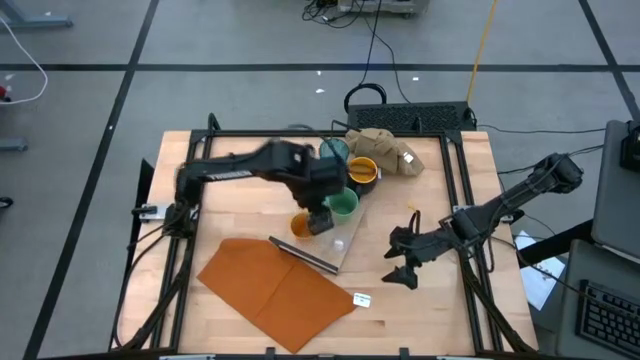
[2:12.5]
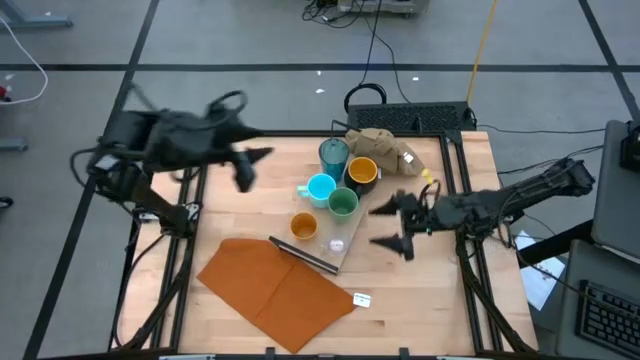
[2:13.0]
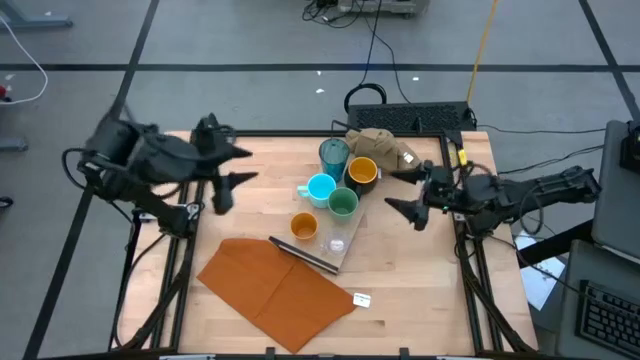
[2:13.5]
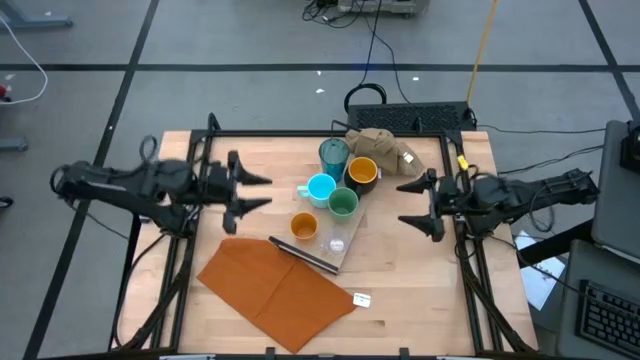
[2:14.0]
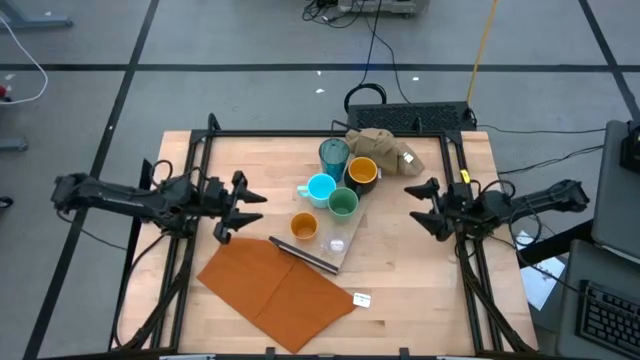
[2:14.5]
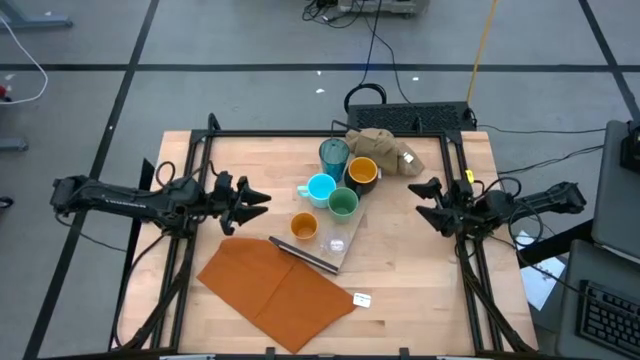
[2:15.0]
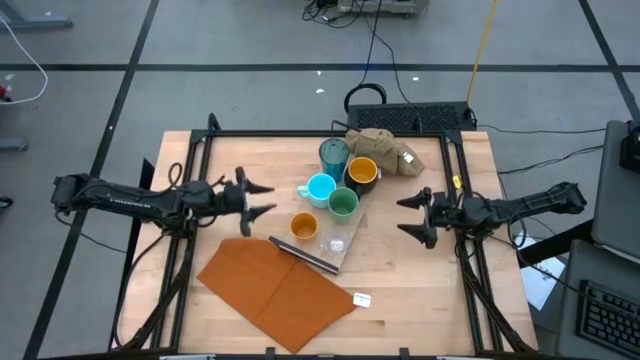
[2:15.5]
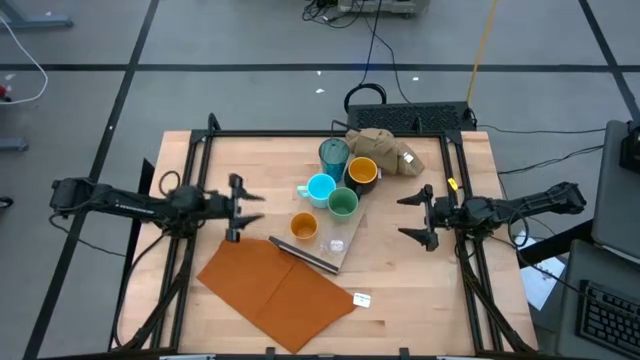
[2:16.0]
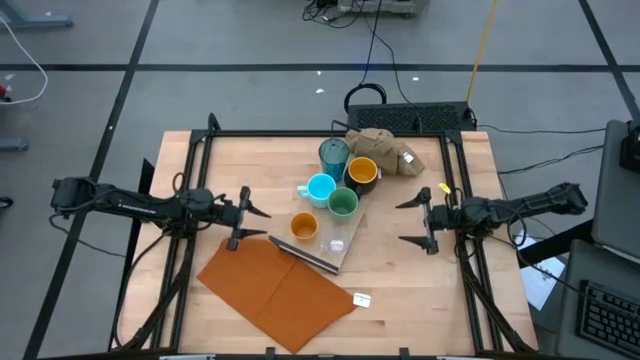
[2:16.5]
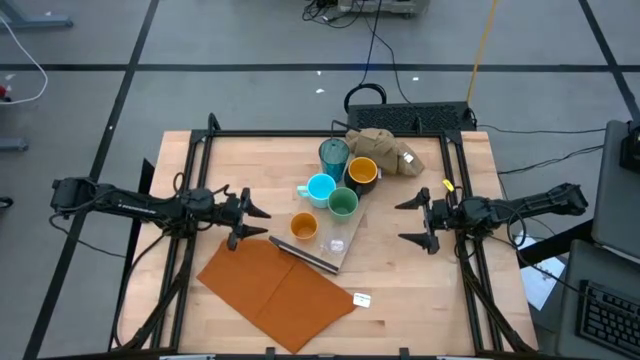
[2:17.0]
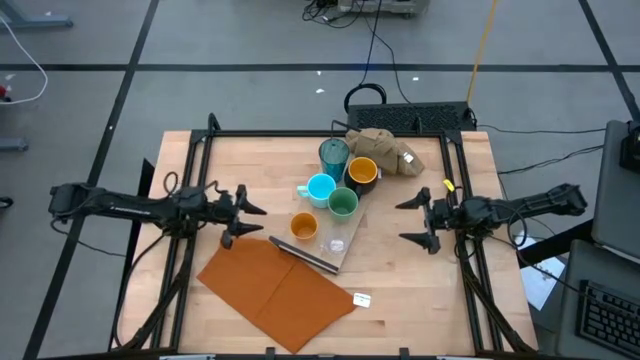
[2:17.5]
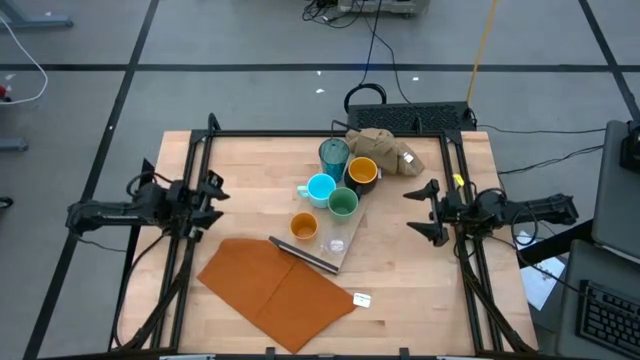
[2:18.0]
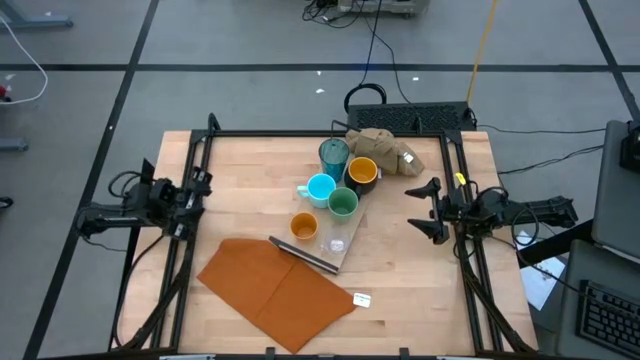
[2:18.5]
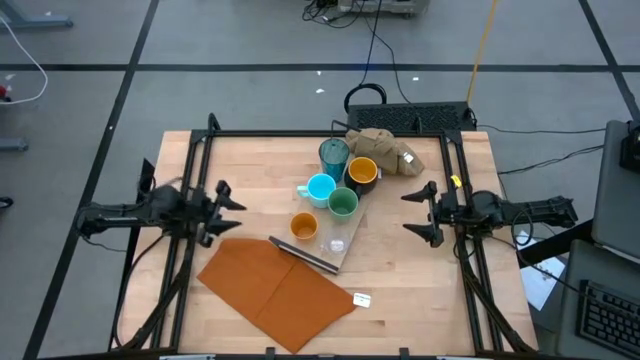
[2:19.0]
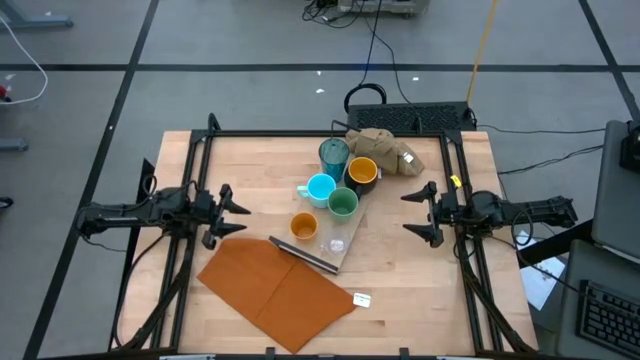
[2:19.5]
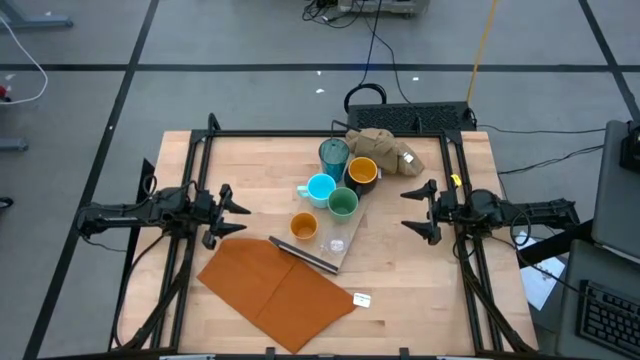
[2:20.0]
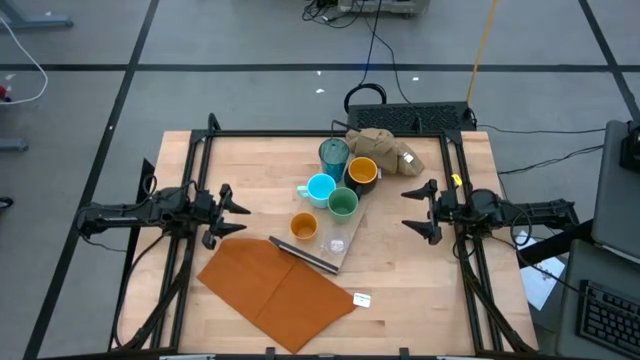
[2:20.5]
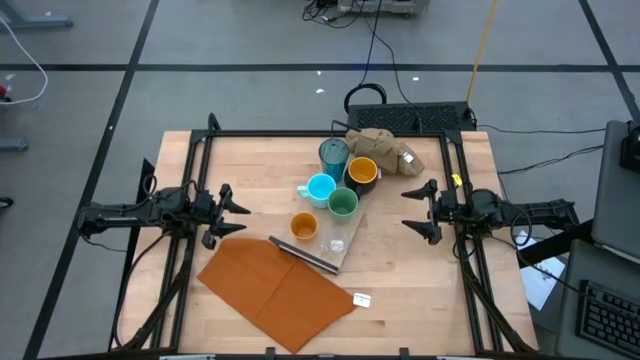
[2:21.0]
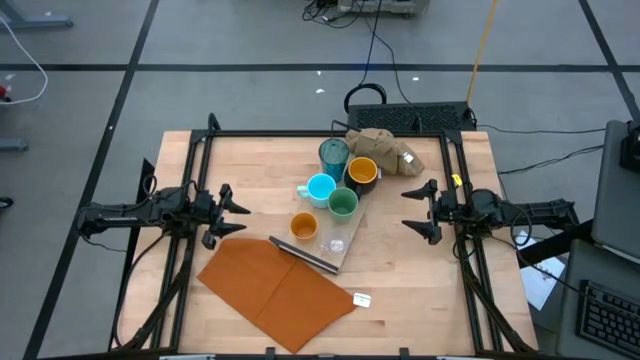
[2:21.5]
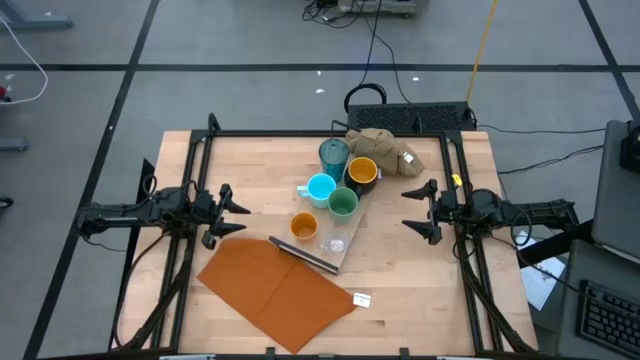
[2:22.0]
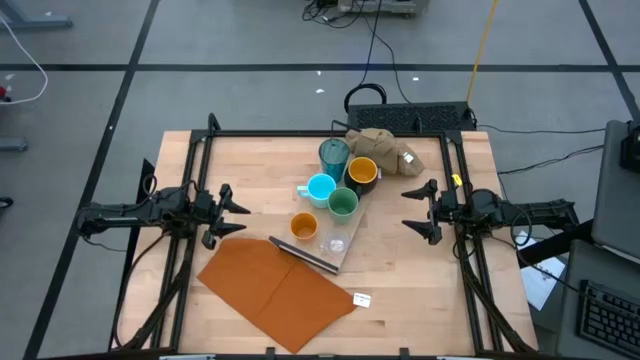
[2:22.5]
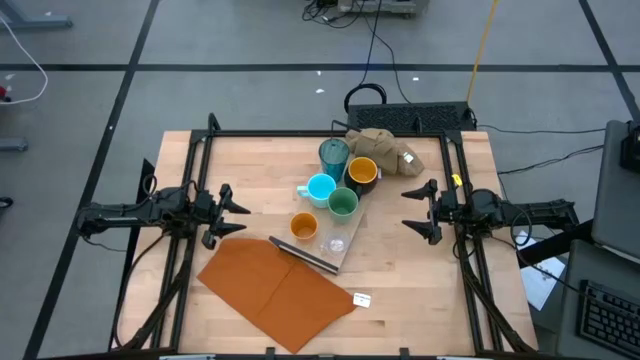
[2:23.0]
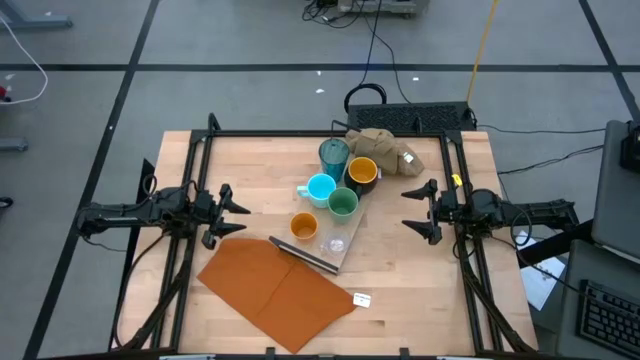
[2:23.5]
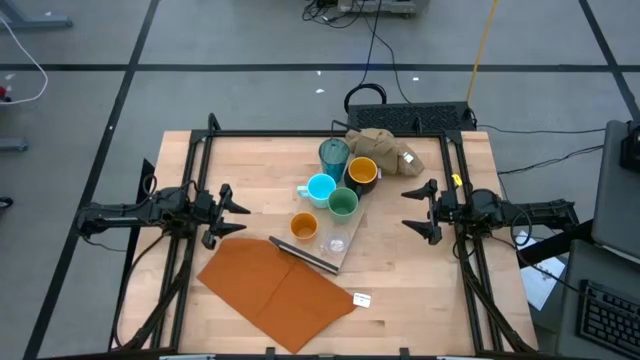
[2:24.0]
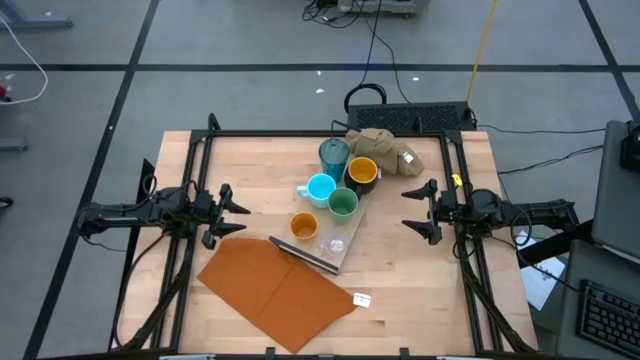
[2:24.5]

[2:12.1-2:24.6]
Task: Stack small to large cups/mugs on shelf
Return to Home Position

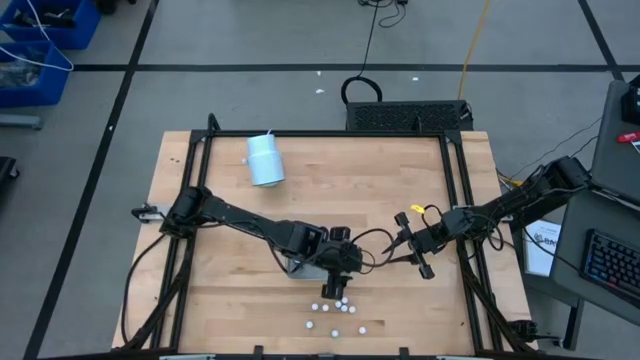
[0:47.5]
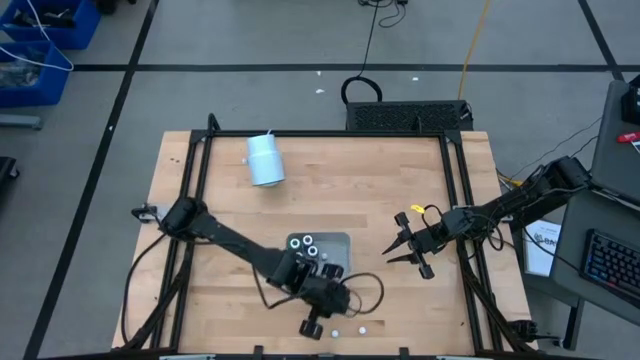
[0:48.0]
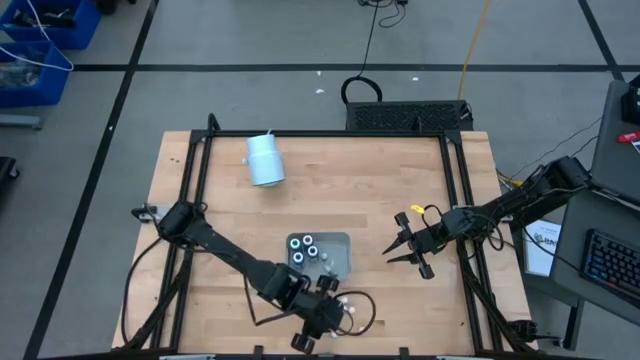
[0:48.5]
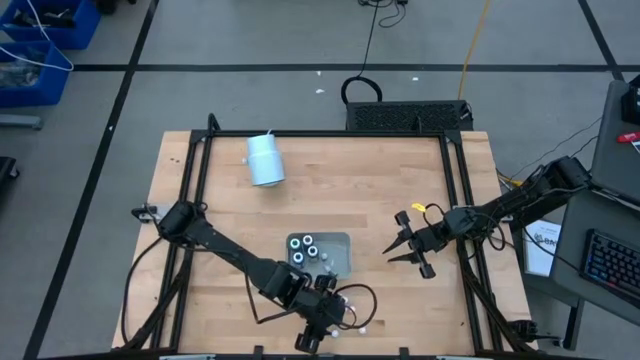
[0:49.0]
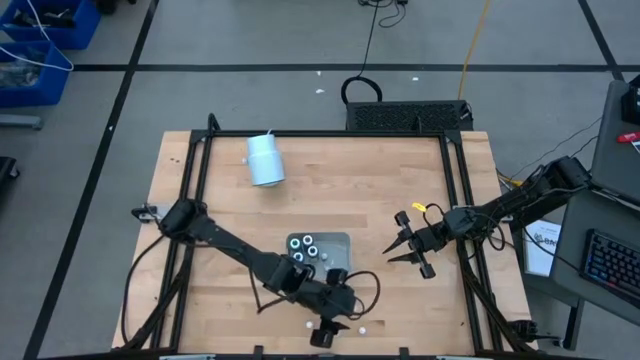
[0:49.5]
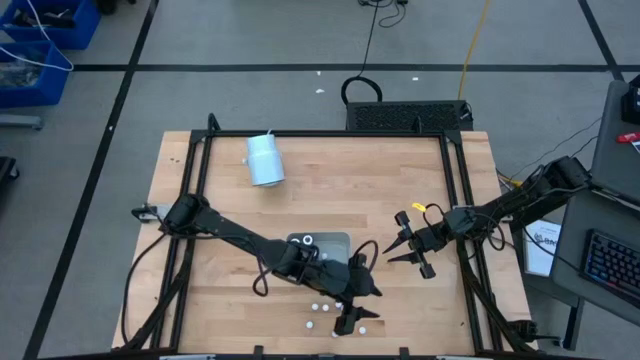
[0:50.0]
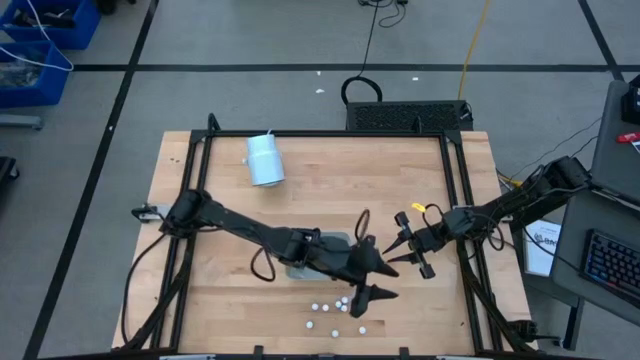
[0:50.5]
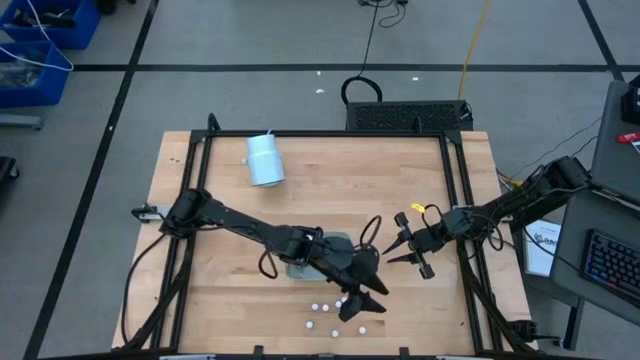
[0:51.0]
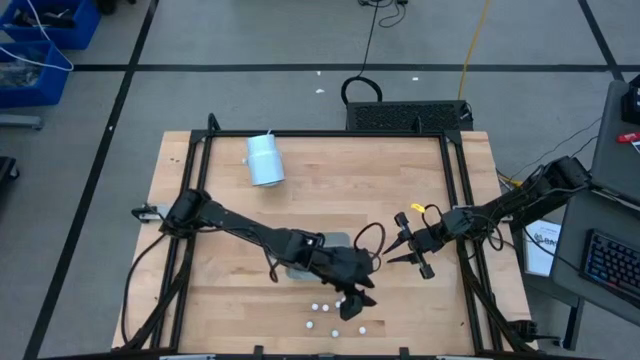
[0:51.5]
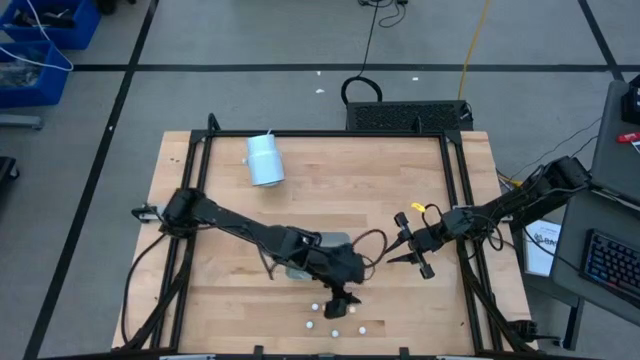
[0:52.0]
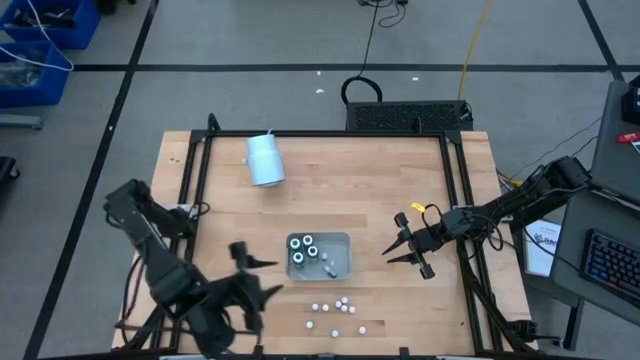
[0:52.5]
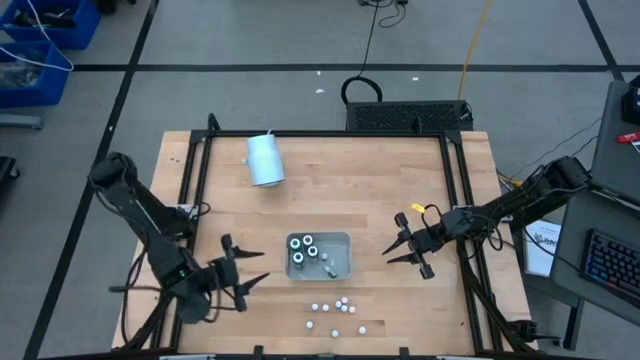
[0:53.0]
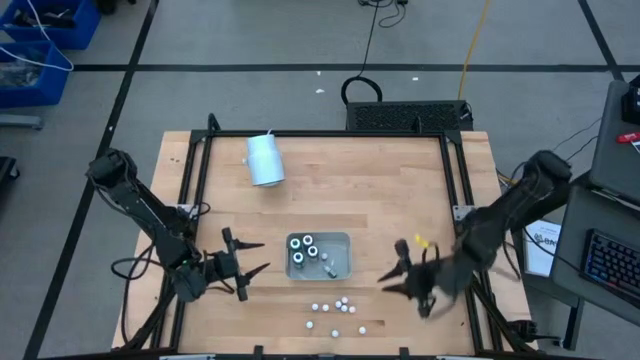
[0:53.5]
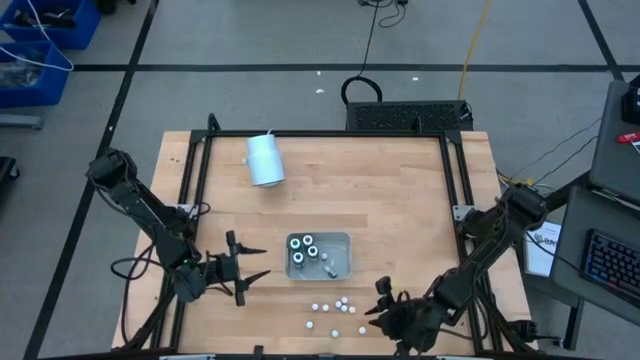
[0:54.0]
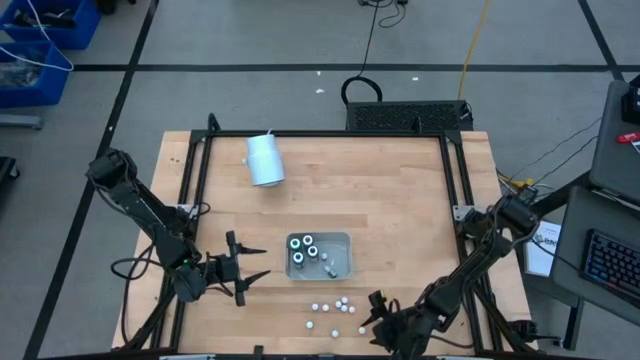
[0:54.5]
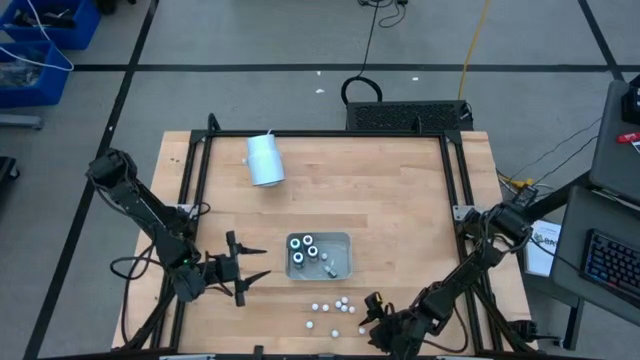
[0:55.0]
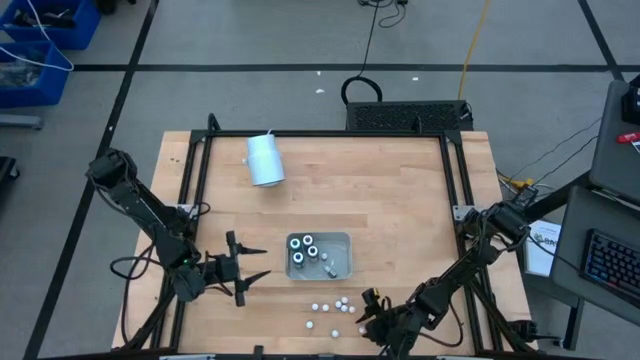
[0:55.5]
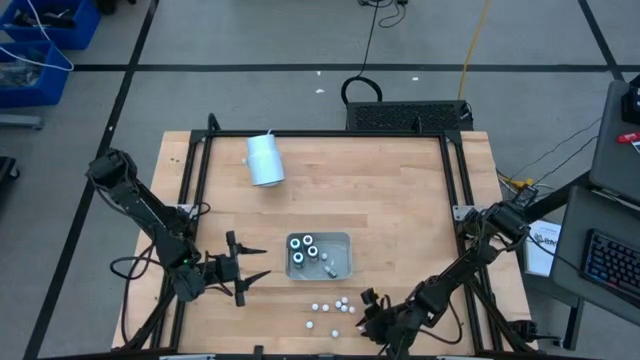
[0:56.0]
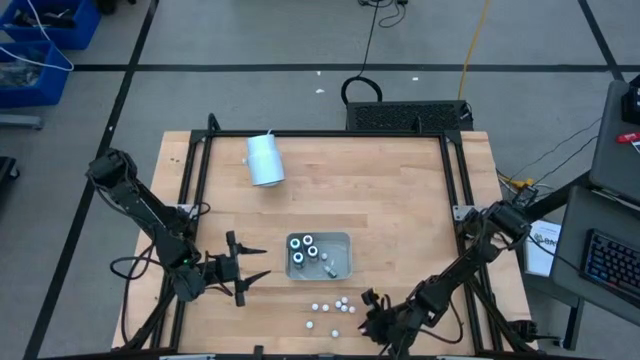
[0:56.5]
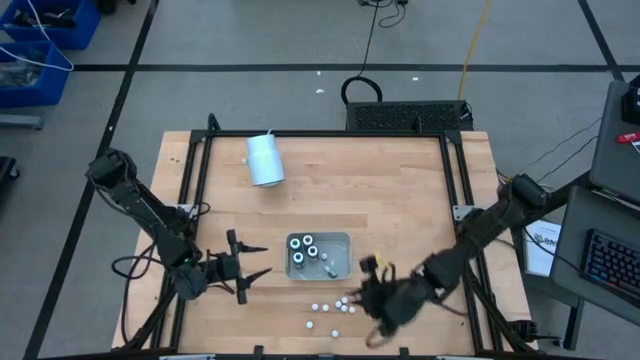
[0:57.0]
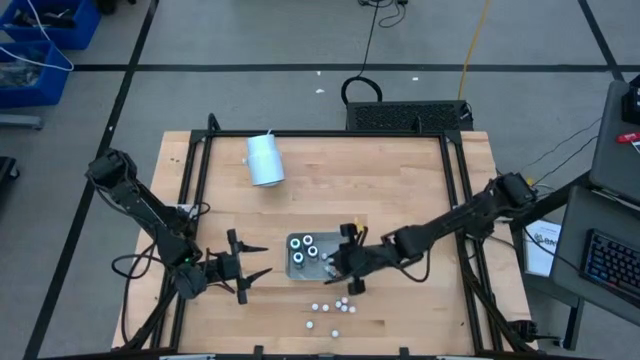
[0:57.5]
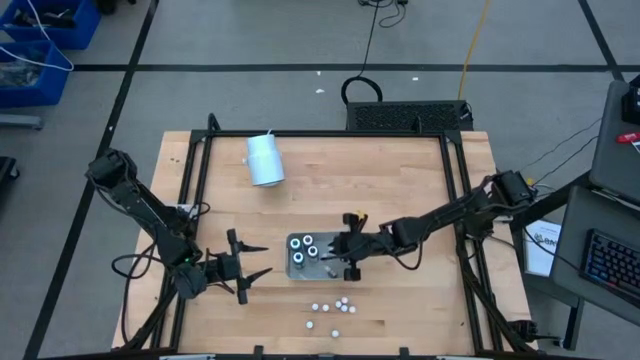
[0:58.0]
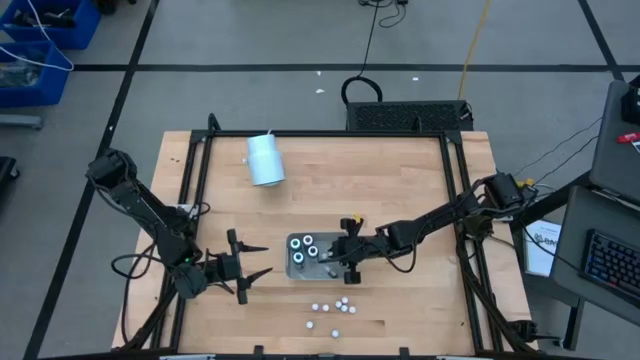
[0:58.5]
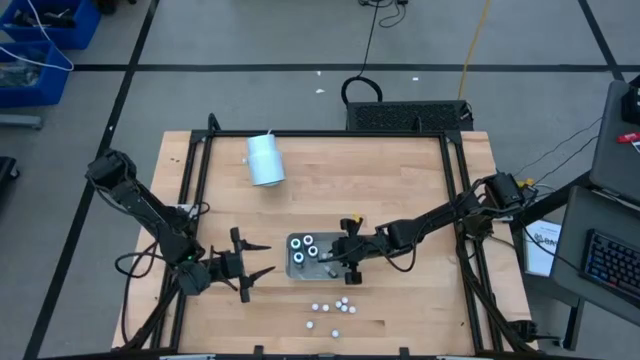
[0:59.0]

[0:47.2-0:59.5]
Task: Pick & Place food coloring
Put the small orange food coloring bottle into the gray bin
